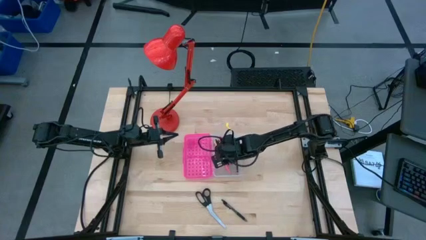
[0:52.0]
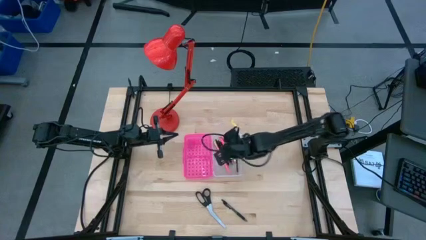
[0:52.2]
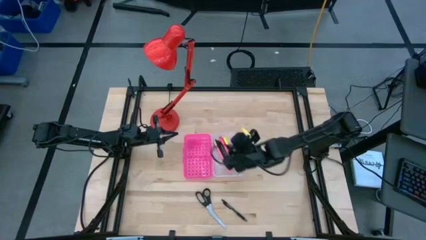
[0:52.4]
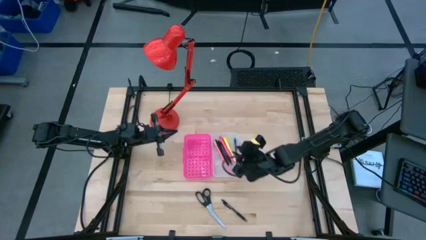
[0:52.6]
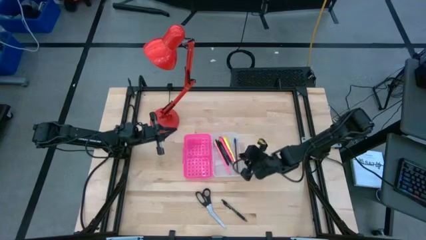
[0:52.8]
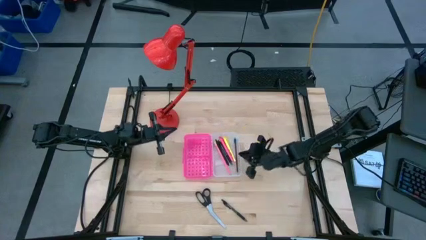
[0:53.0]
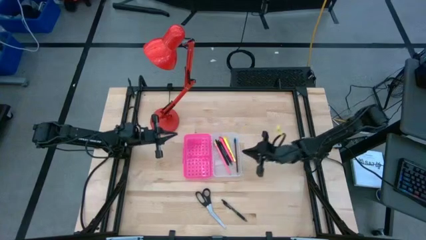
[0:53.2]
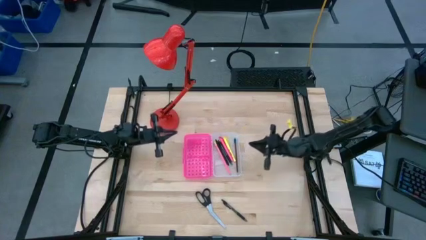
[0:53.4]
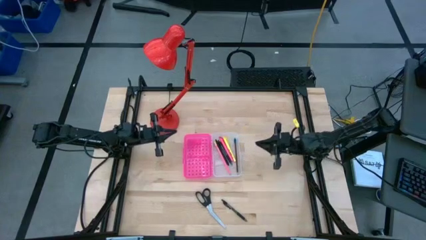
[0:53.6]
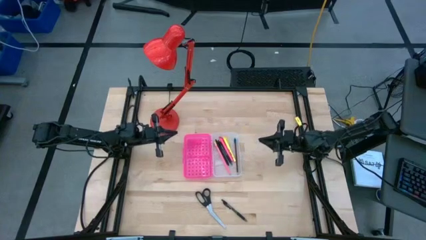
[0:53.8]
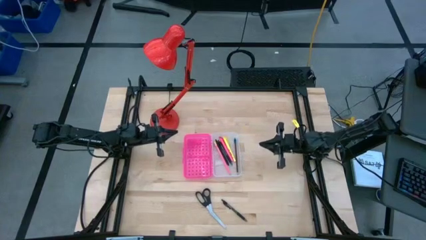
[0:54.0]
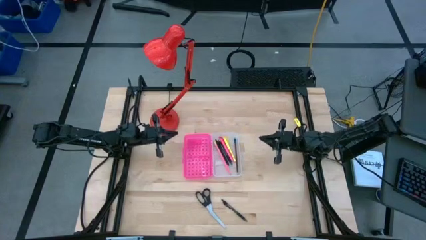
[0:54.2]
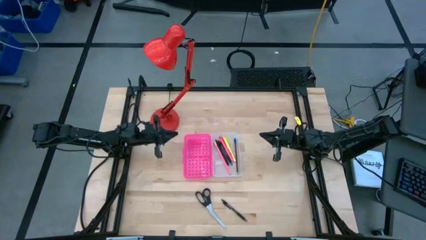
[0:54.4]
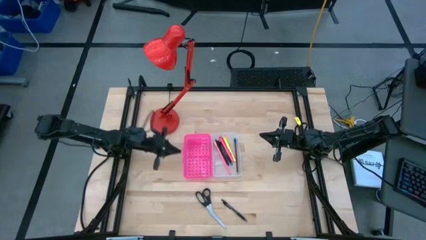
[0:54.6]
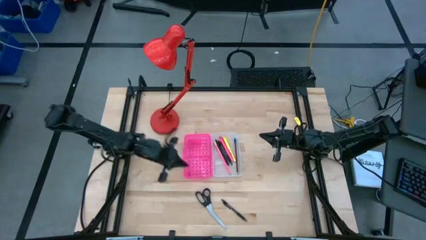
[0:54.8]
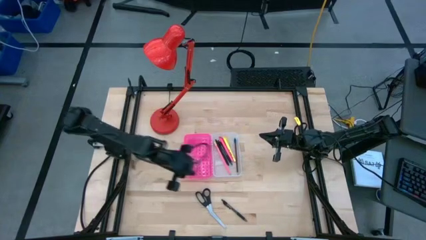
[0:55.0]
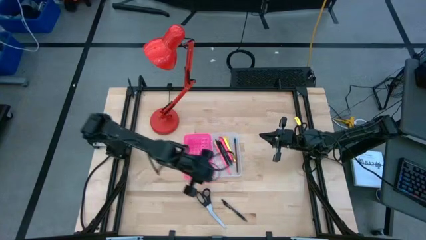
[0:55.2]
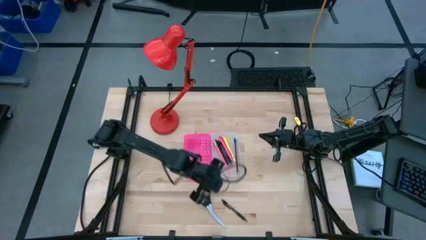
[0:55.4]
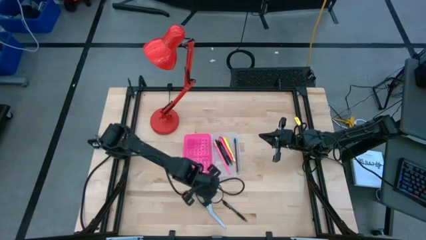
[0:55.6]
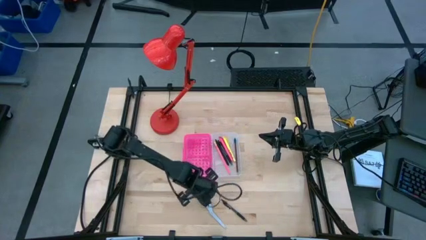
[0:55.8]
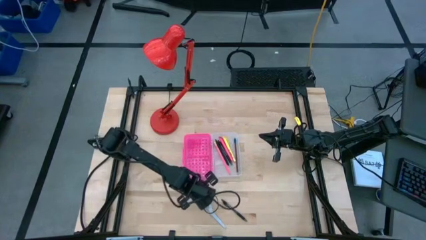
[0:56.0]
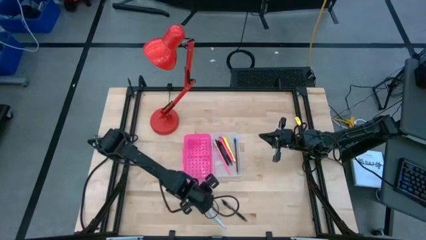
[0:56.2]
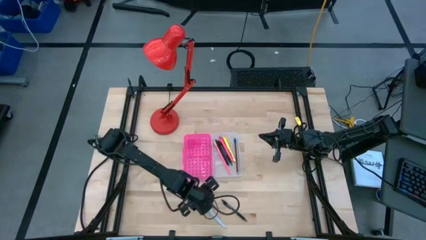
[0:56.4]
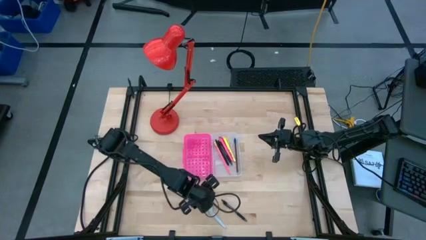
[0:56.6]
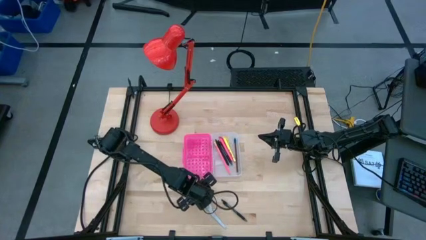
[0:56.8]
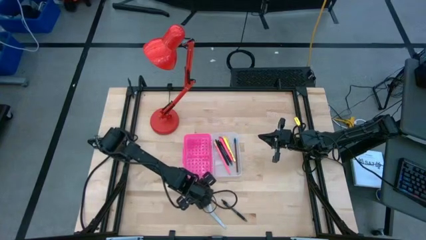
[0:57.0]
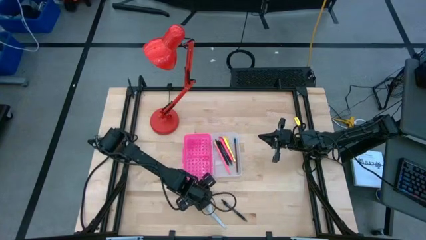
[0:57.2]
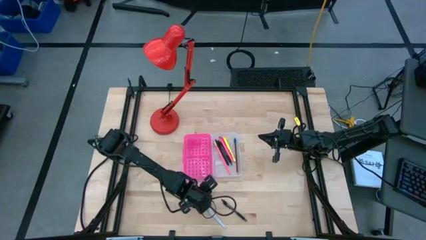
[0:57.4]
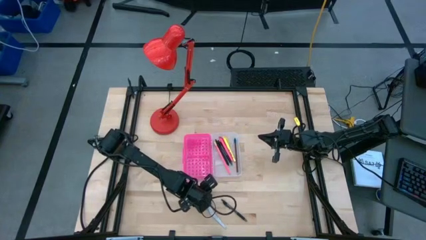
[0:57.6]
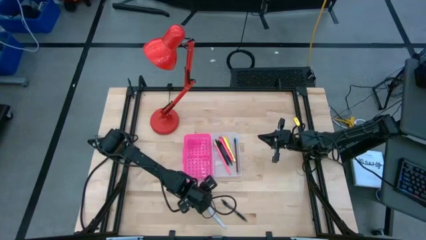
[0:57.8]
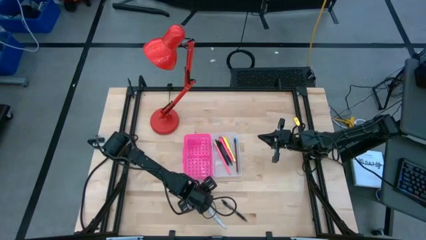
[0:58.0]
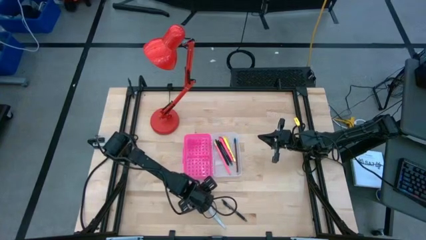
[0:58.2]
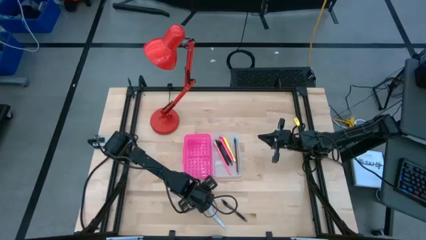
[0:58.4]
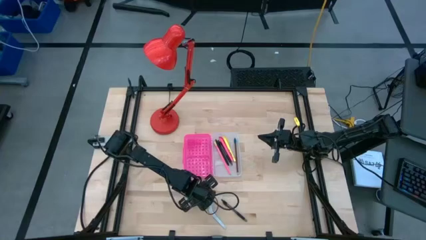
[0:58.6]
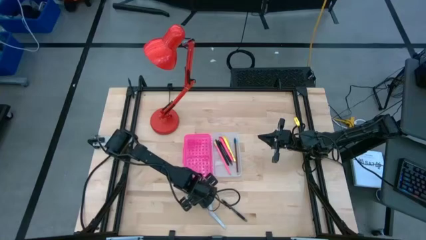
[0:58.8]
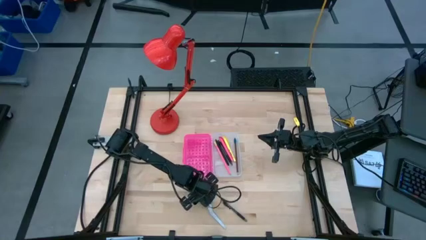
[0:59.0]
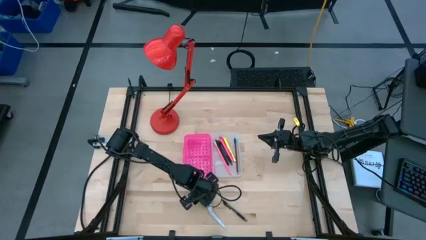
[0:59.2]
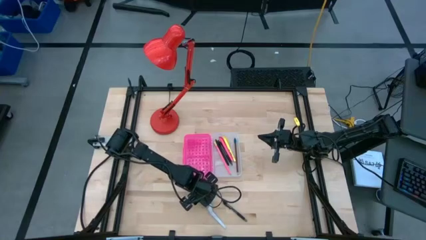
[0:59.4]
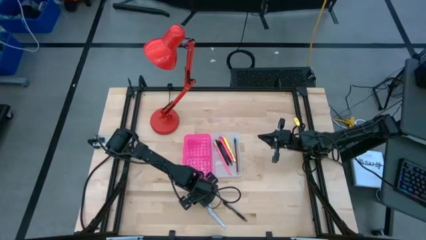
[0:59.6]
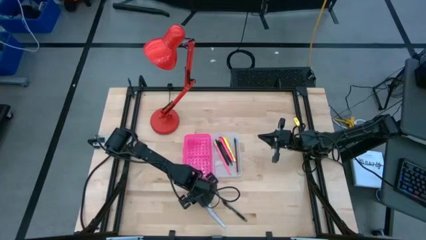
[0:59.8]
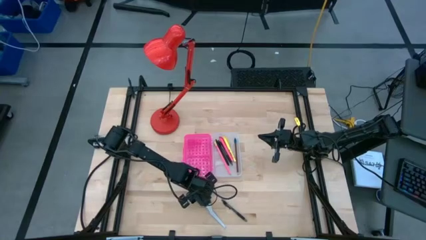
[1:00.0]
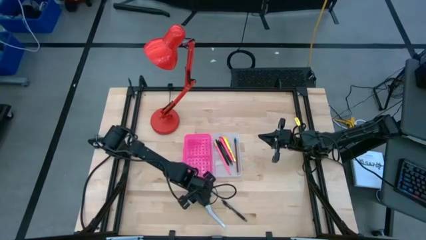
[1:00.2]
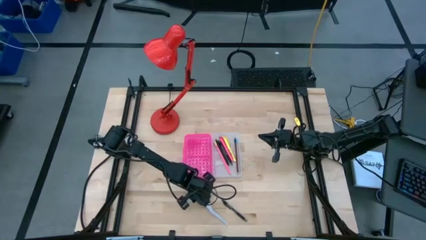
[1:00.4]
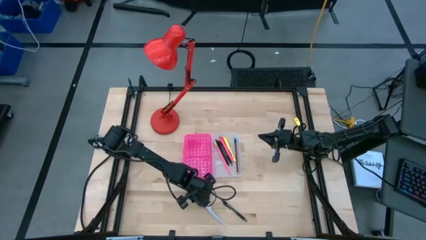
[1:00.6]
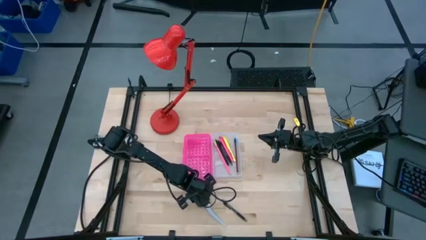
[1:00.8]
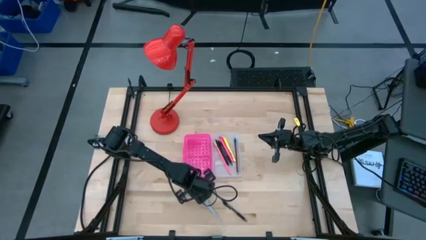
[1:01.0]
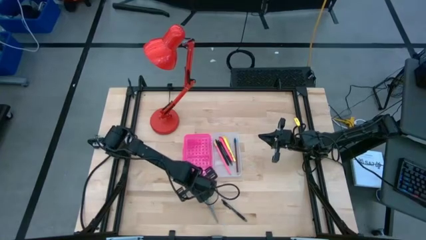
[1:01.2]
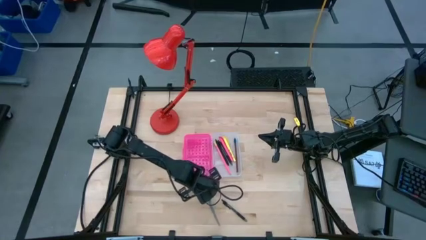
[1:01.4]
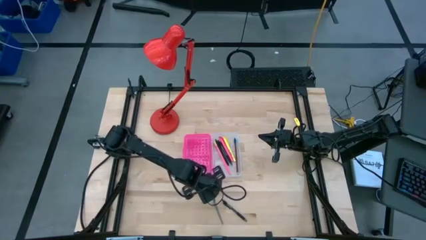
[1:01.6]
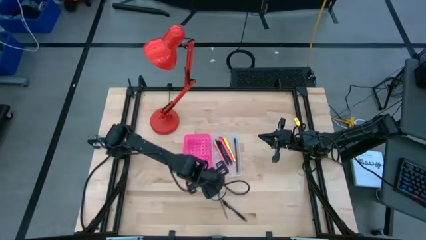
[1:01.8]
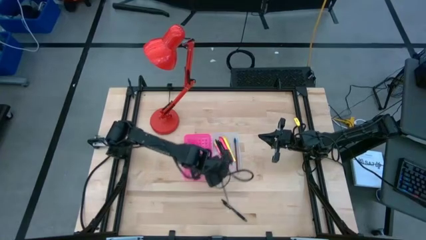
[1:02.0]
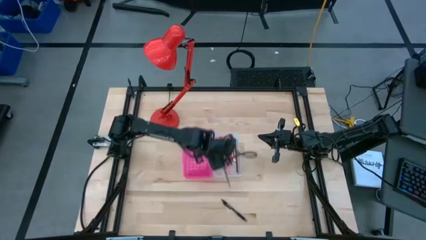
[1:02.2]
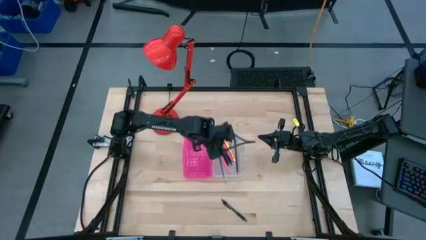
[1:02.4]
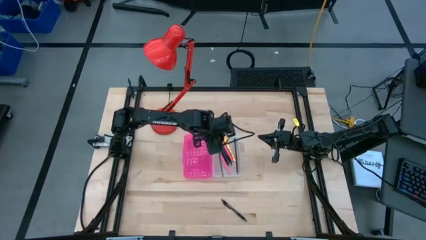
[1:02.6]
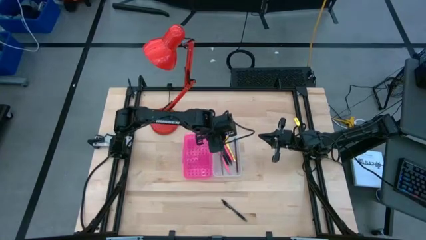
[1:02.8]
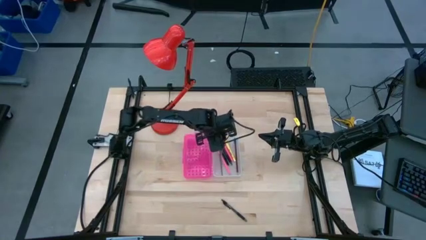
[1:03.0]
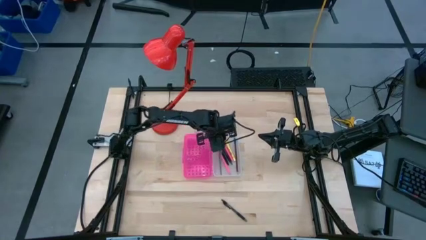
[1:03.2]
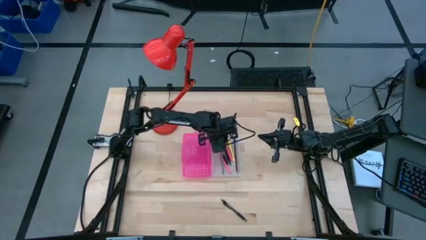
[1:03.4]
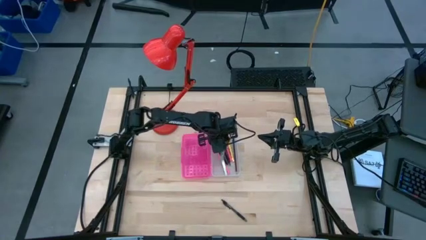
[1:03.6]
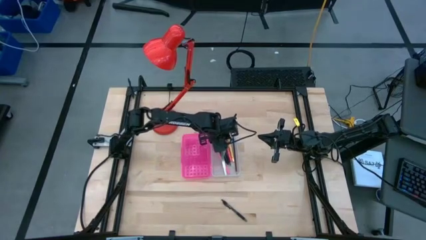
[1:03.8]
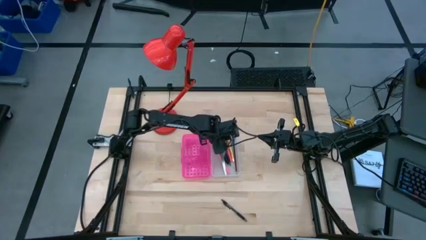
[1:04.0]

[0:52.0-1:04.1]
Task: Pick & place school supplies into a supply box
Put the black scissors into the pink supply box

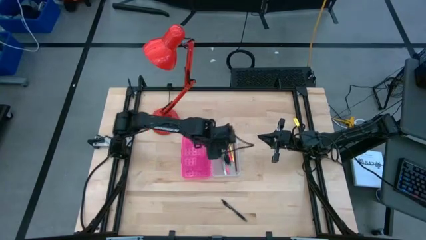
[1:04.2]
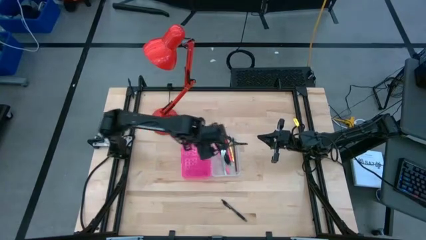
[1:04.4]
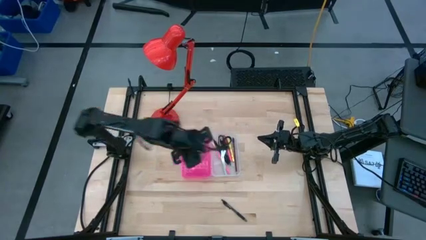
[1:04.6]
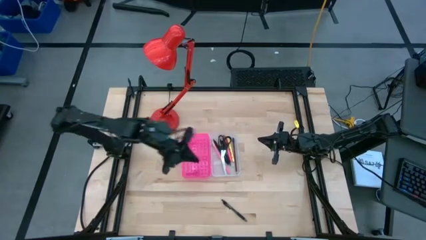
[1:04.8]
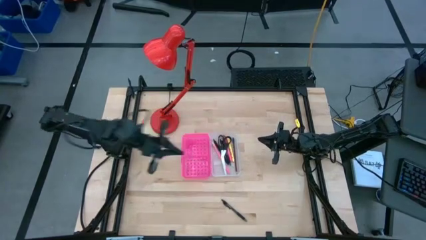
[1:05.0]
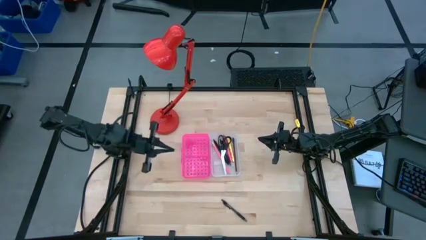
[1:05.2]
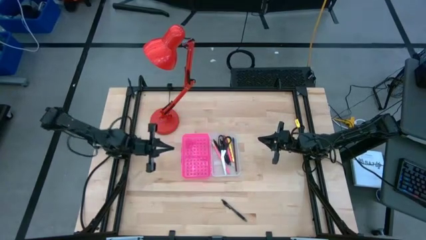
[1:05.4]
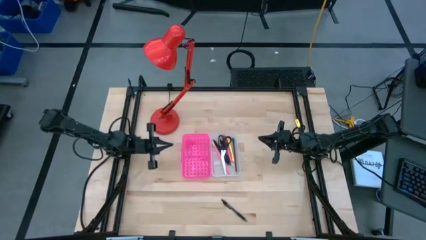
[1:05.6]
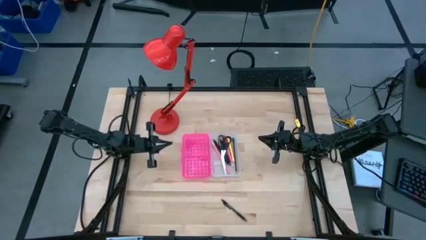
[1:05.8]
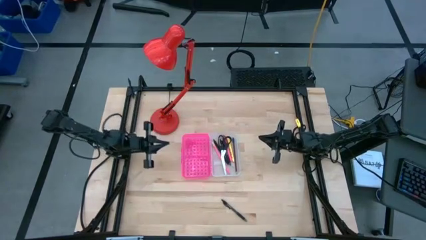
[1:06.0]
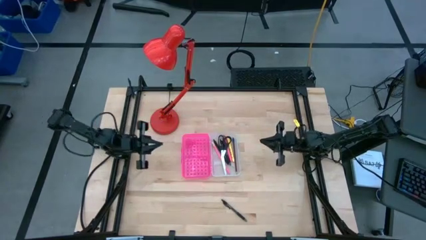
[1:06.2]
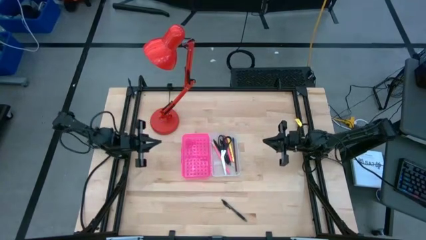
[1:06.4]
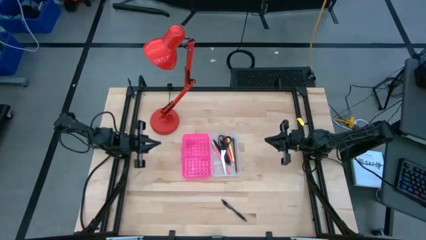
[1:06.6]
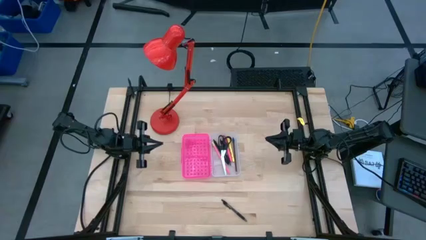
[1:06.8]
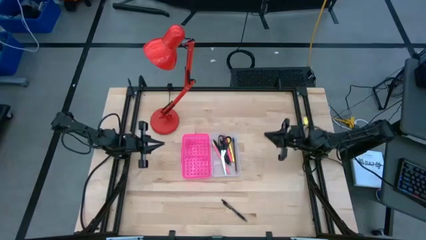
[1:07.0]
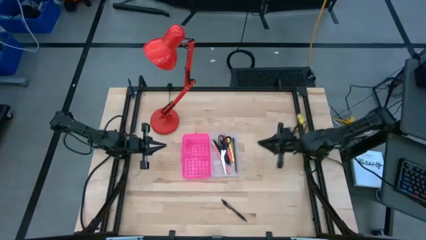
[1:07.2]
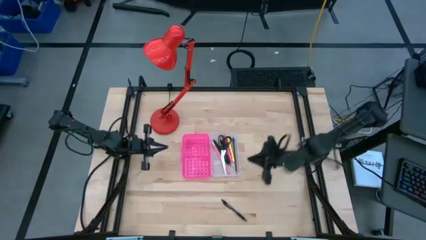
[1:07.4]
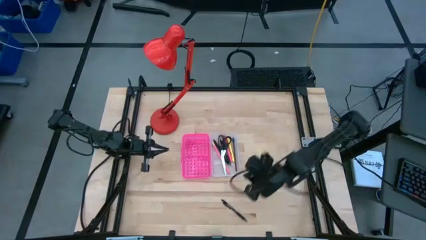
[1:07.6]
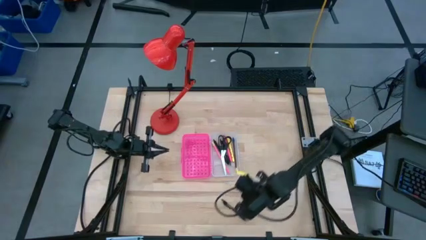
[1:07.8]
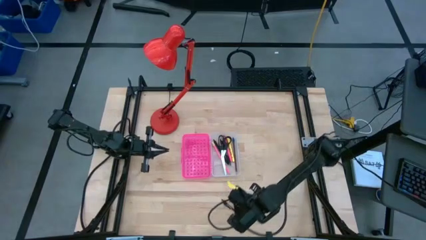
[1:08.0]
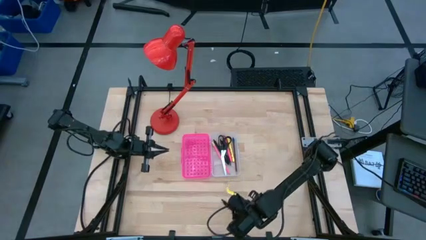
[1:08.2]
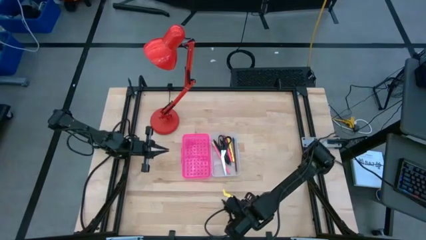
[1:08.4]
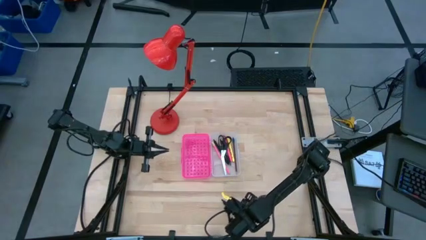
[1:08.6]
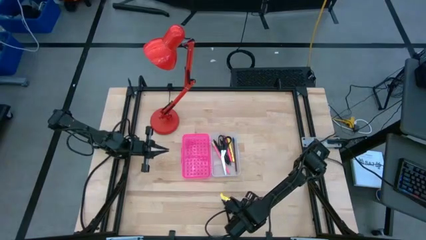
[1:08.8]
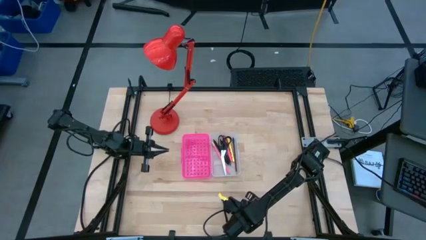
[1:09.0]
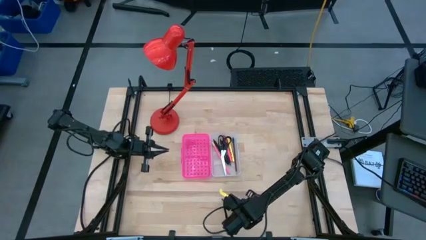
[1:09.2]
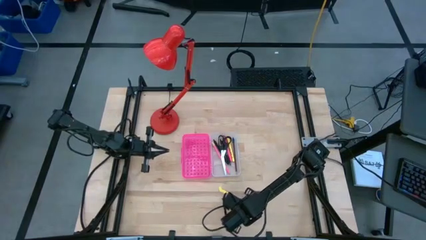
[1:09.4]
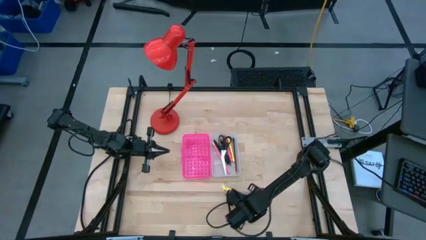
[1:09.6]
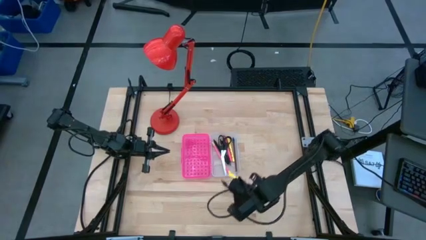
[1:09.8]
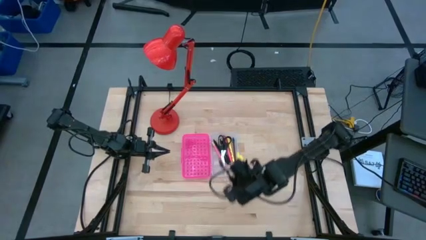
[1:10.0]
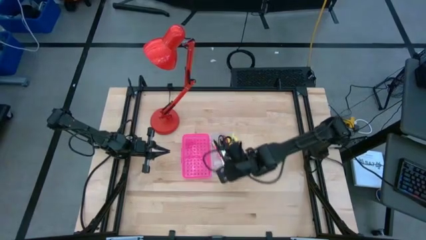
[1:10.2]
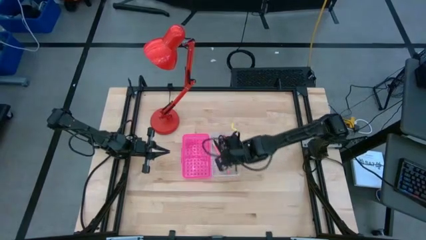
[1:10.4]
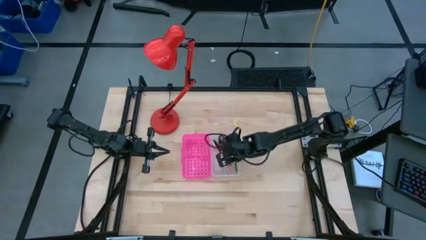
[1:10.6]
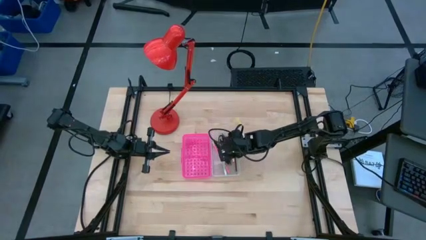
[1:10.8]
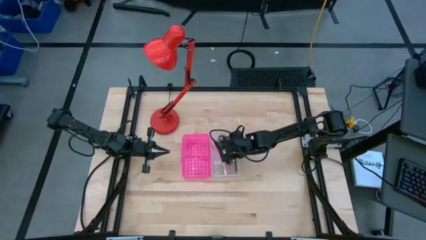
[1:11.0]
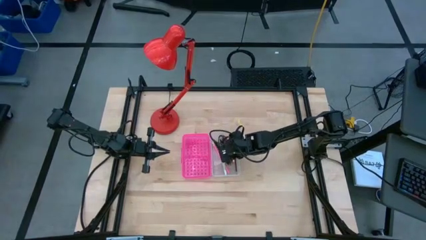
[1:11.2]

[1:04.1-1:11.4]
Put the black pen into the pink supply box
